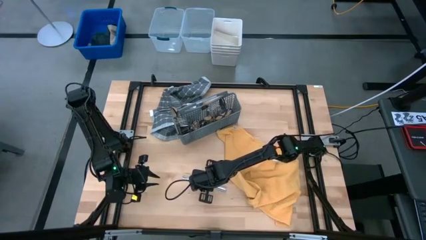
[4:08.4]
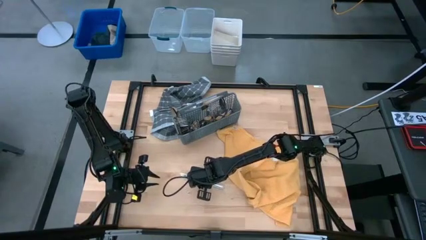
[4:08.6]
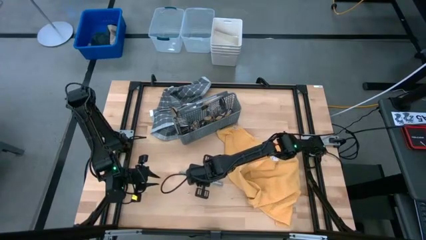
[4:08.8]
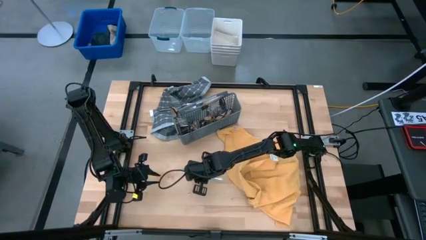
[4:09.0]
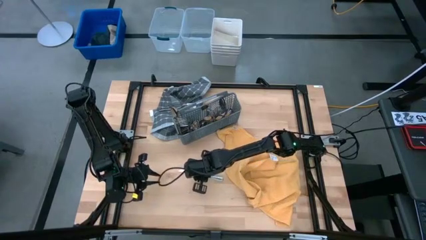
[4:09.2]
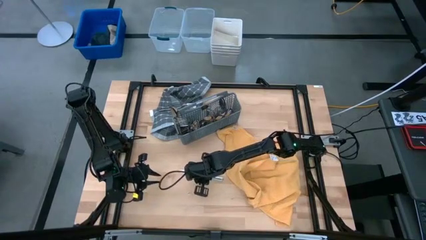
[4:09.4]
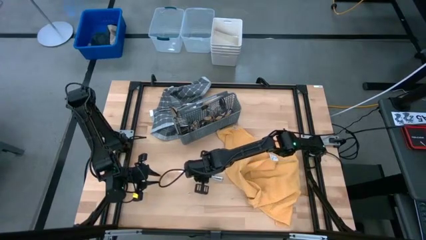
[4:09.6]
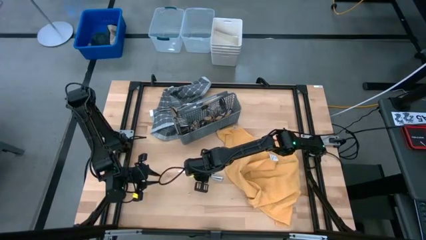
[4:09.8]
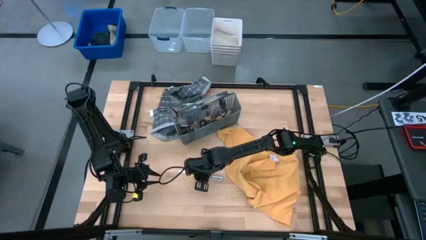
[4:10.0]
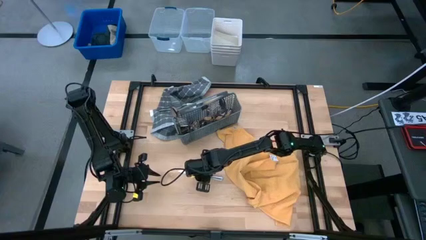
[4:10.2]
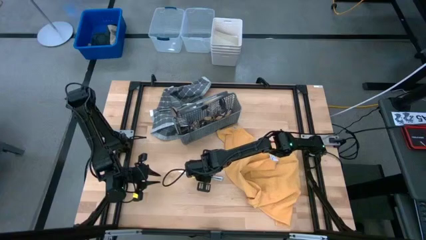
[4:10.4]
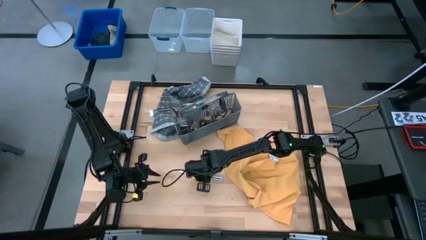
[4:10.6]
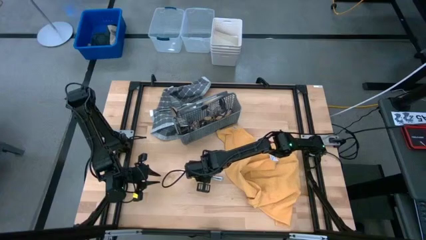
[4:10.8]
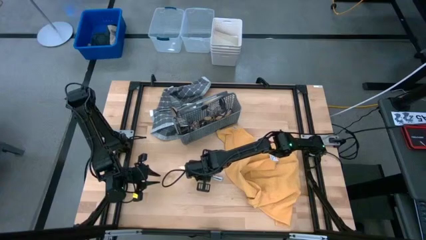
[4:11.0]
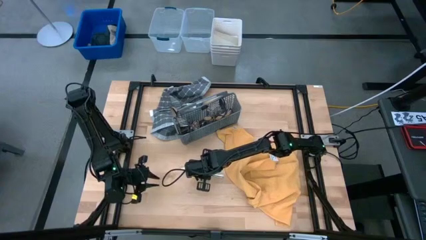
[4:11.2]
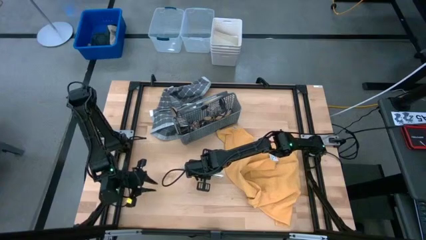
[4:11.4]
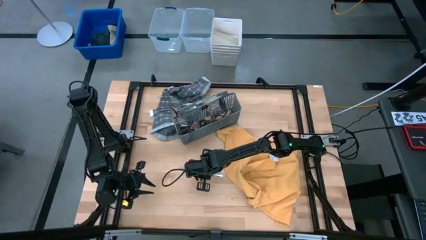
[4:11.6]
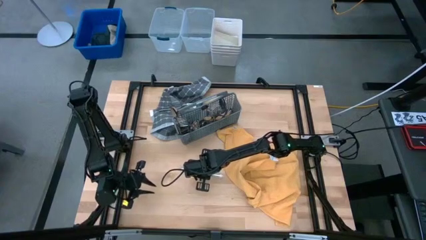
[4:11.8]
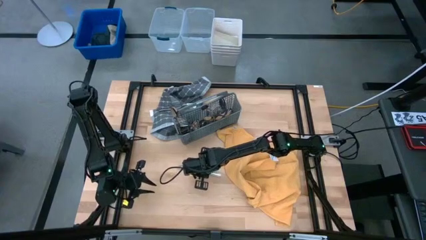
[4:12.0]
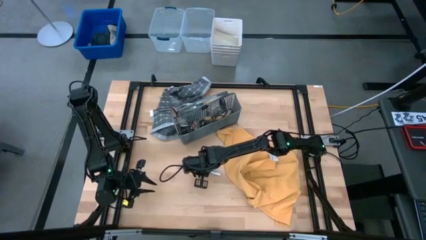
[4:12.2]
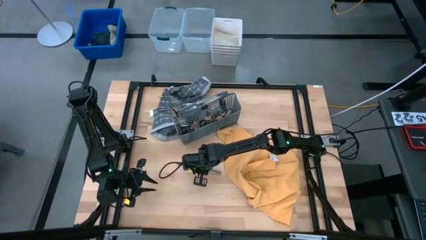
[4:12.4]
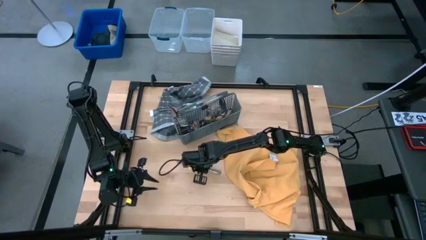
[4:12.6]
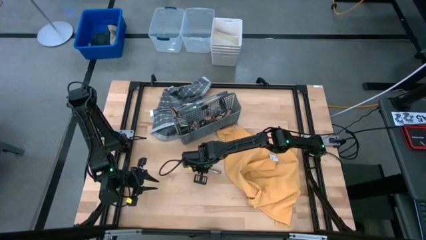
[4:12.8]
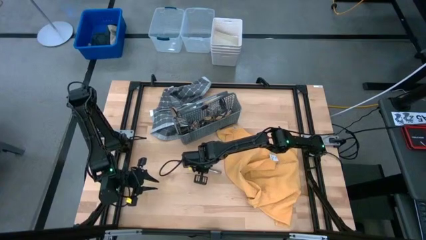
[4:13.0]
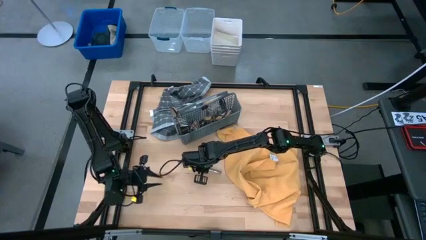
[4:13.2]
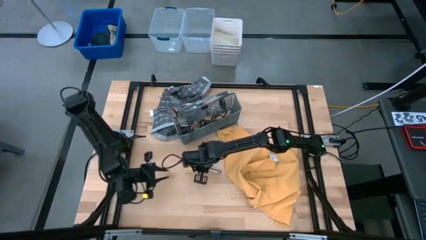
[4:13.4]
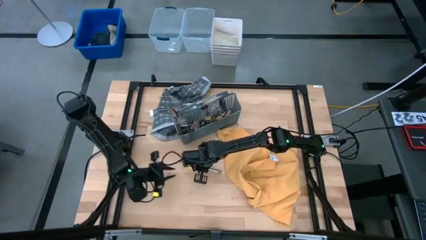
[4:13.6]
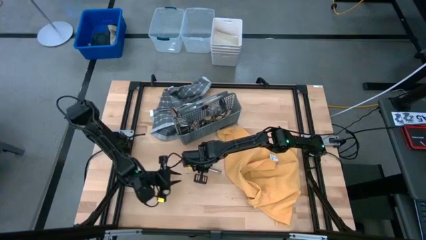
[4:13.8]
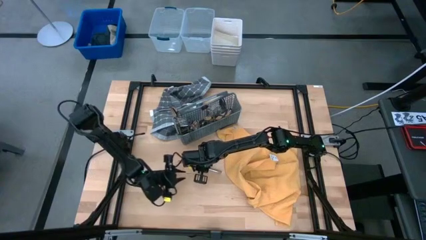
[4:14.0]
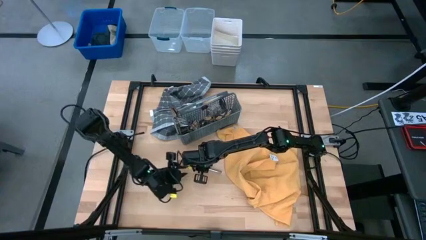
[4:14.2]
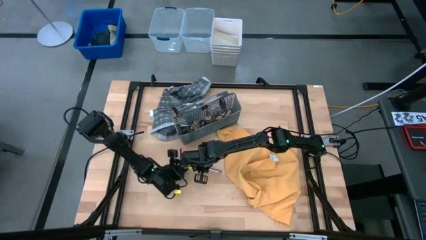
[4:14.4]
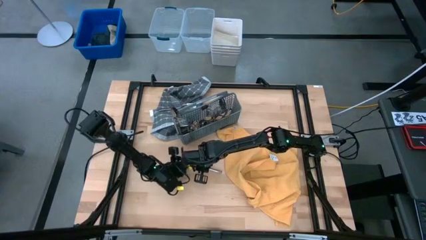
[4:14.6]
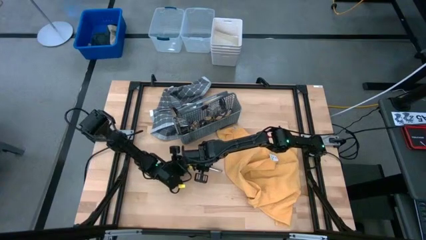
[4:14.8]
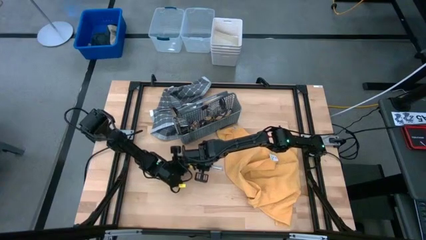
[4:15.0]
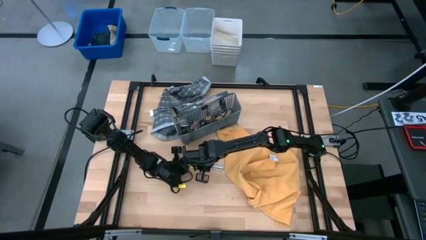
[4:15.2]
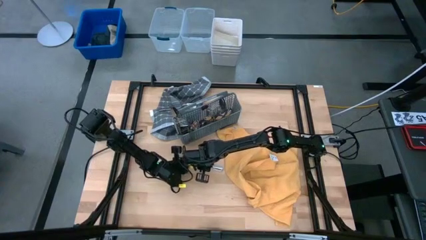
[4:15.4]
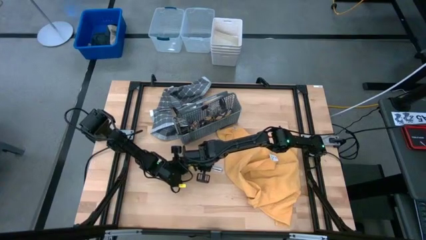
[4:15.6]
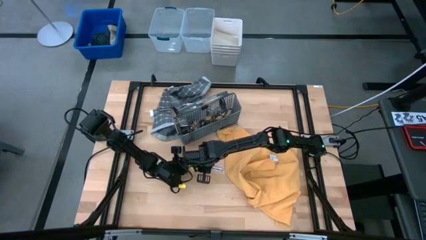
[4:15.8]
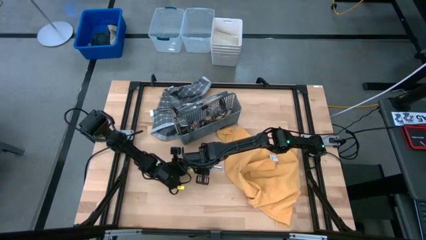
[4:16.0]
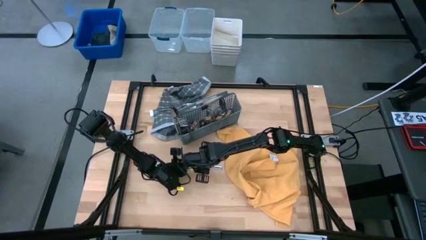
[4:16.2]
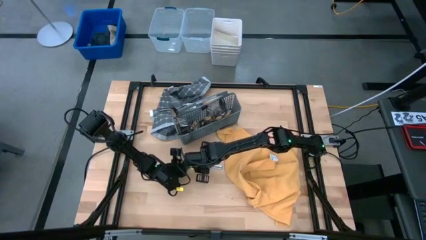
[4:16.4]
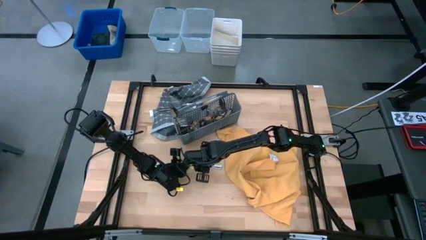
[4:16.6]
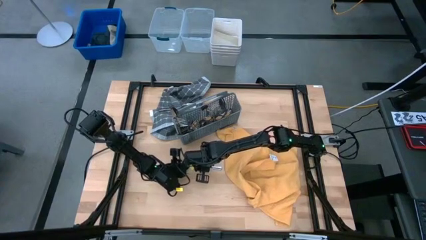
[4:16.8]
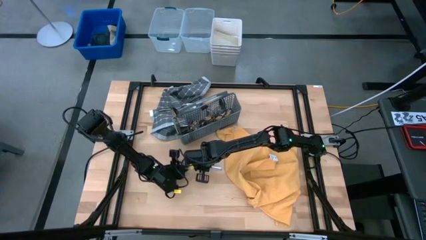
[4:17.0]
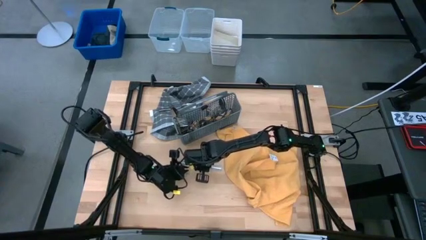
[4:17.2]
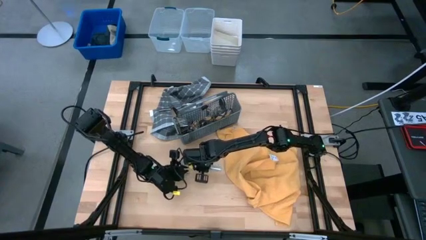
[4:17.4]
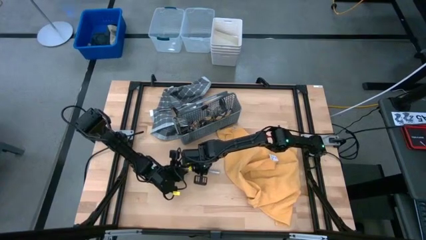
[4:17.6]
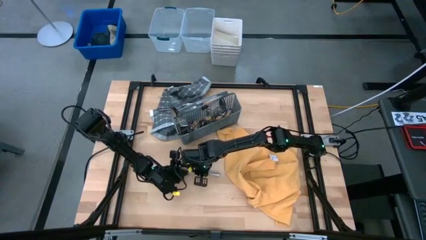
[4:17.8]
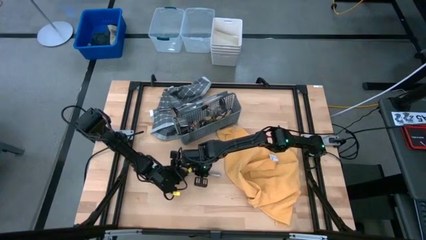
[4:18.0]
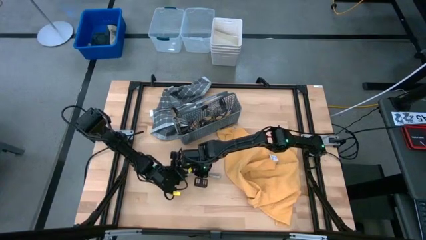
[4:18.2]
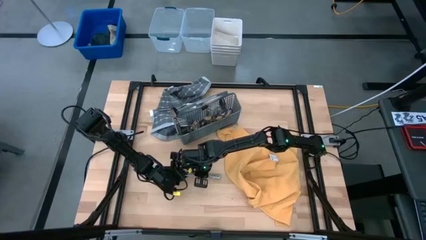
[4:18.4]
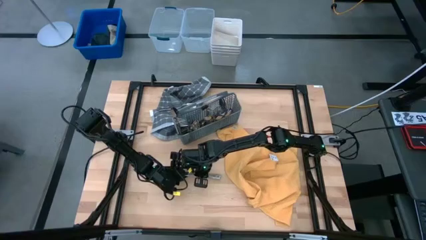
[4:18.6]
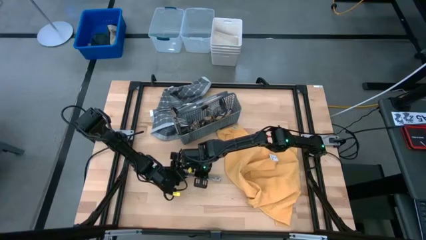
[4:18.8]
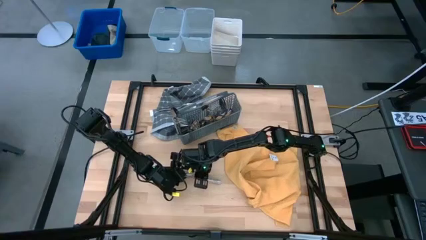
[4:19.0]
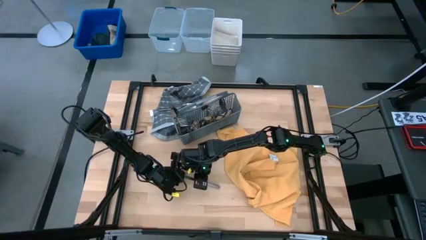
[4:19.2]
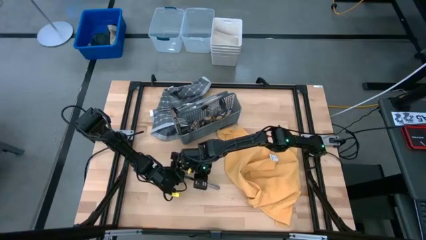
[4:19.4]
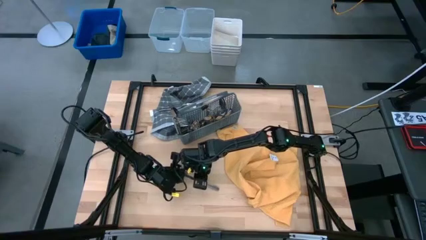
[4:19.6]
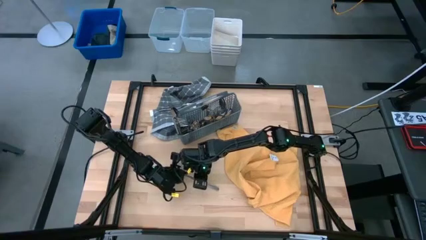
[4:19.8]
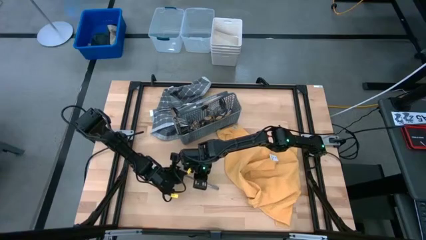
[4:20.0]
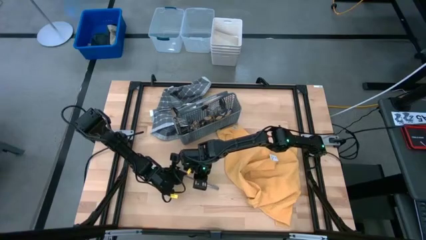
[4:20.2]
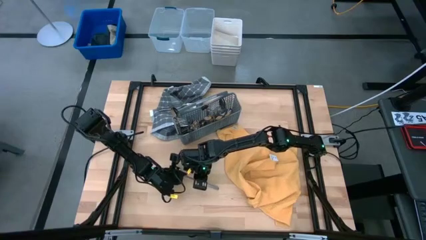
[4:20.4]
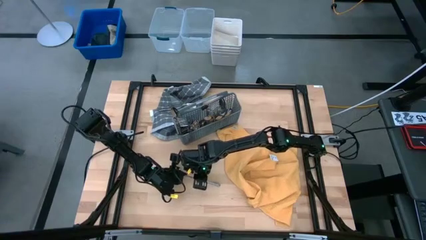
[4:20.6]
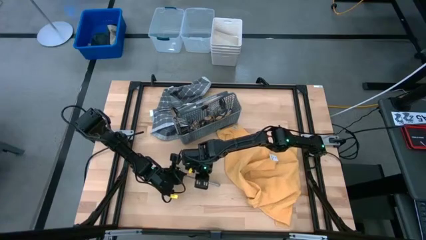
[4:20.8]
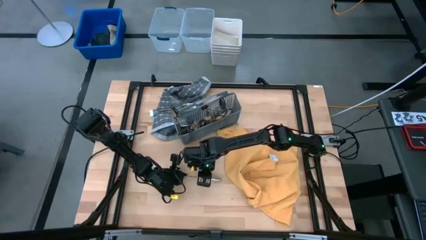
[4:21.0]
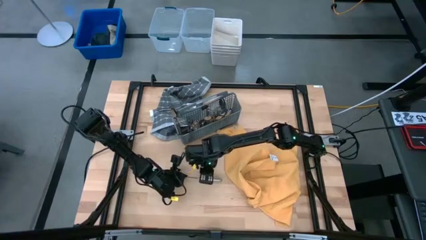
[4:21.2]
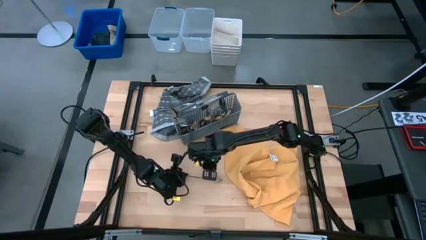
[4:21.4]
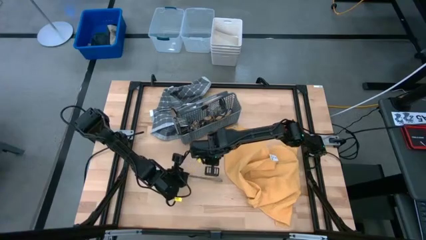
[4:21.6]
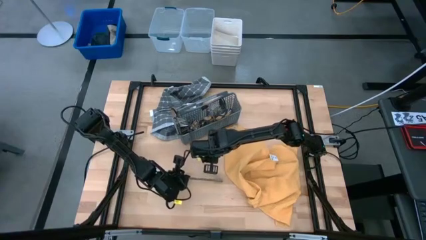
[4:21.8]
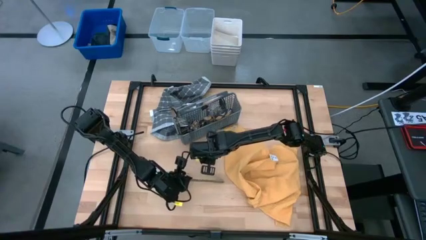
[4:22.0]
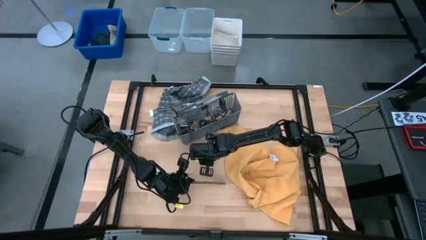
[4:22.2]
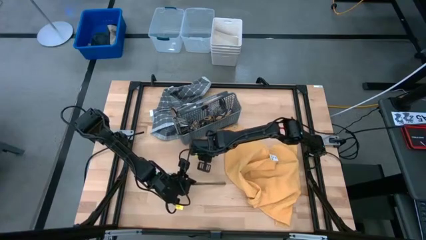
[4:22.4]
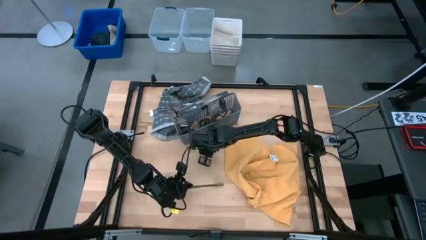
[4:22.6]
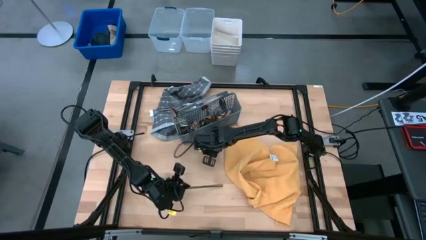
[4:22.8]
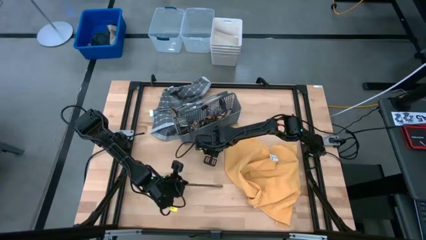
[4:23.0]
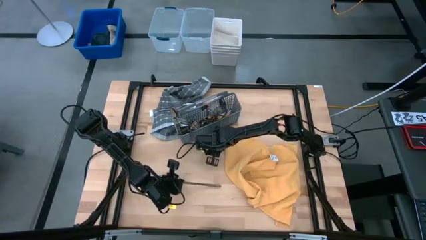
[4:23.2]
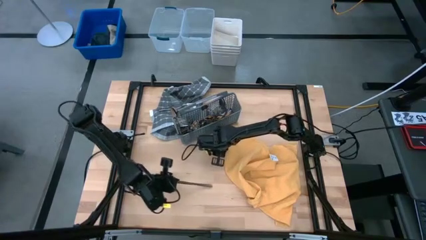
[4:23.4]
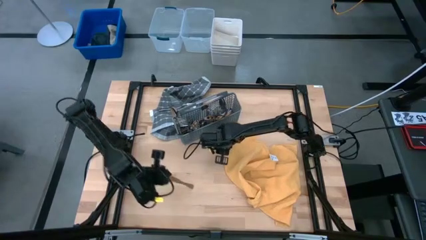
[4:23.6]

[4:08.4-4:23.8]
Task: Sort silverware
Put the silver knife into the gray silverware basket
